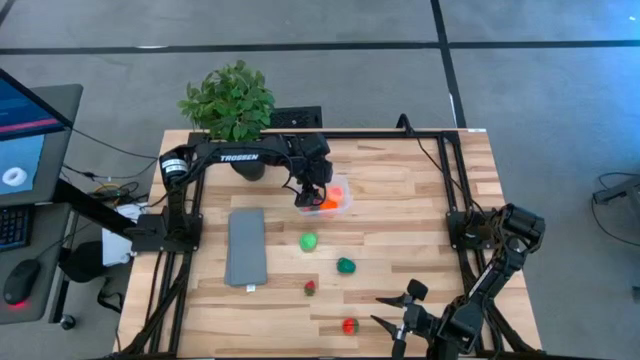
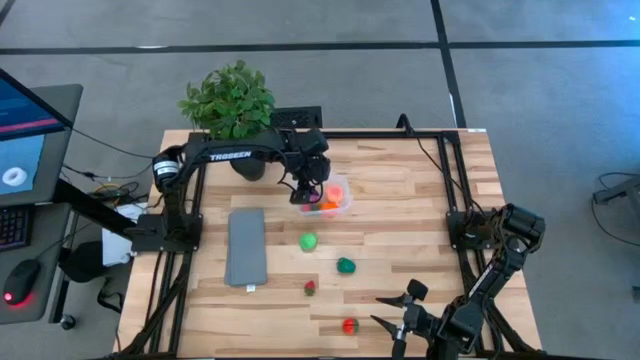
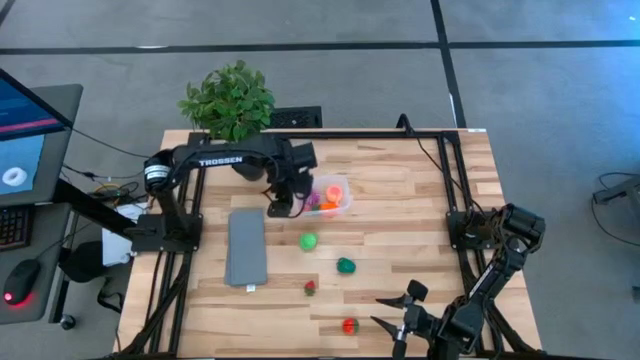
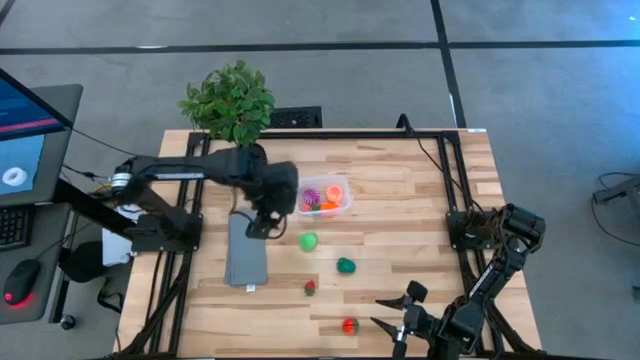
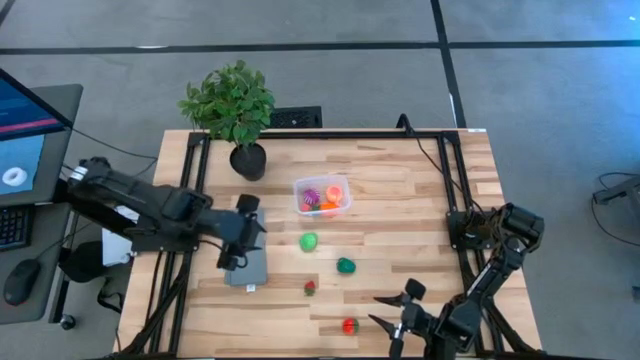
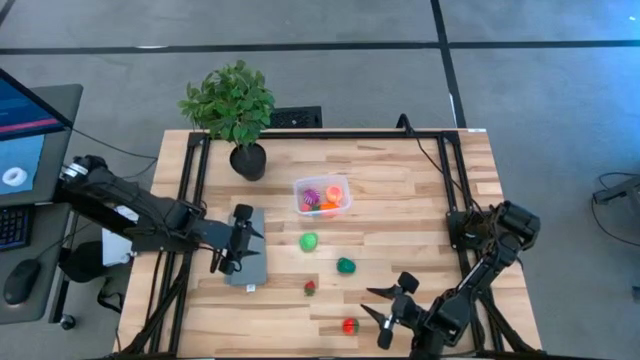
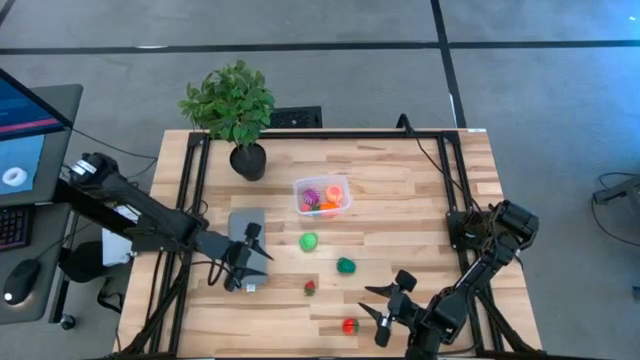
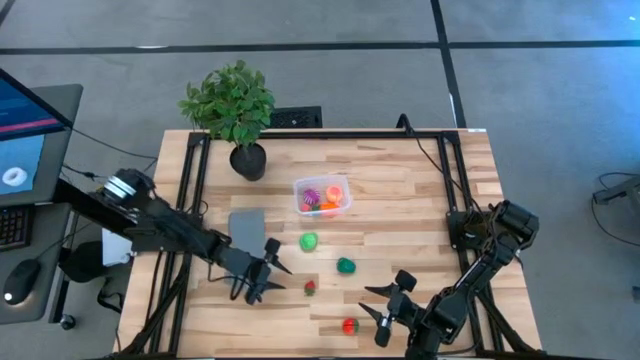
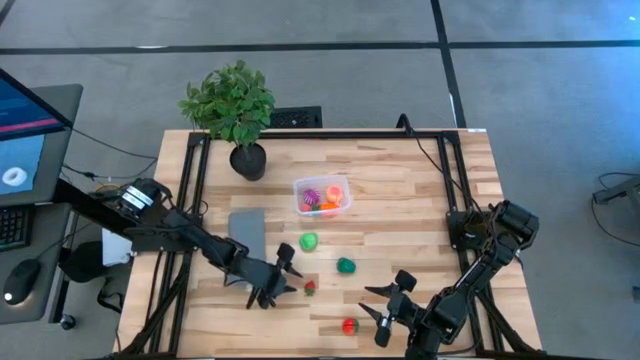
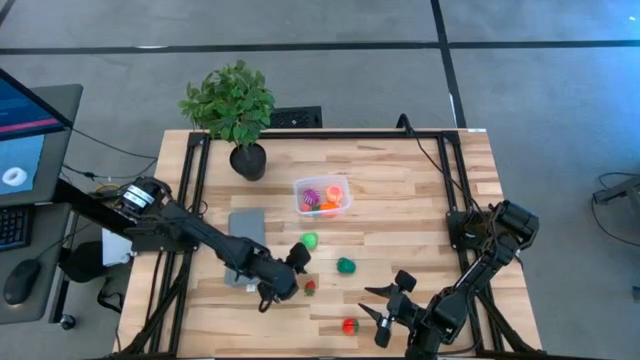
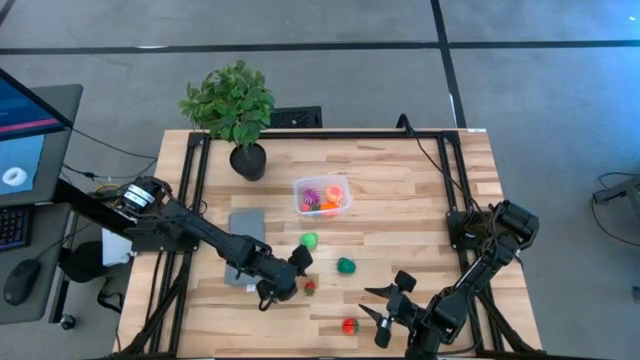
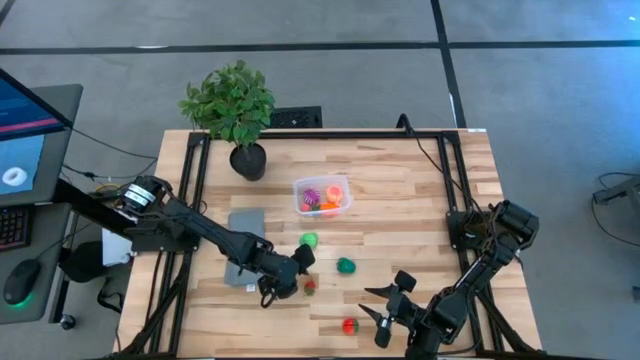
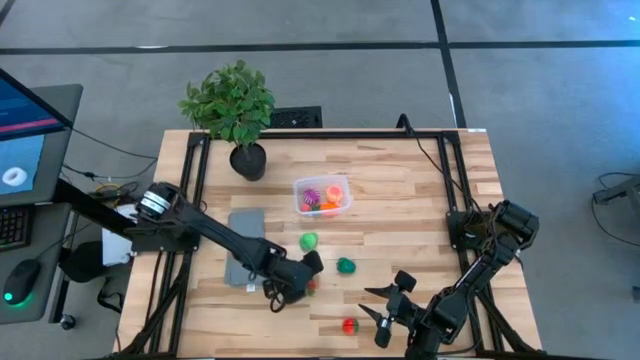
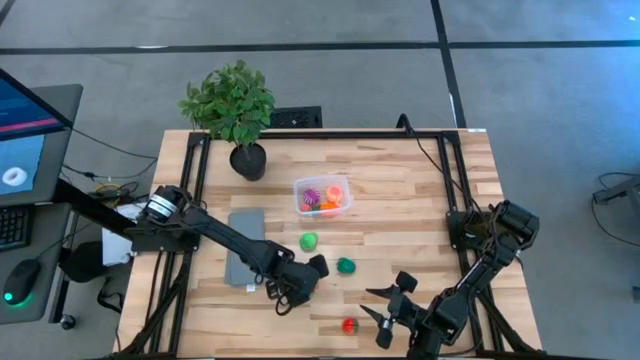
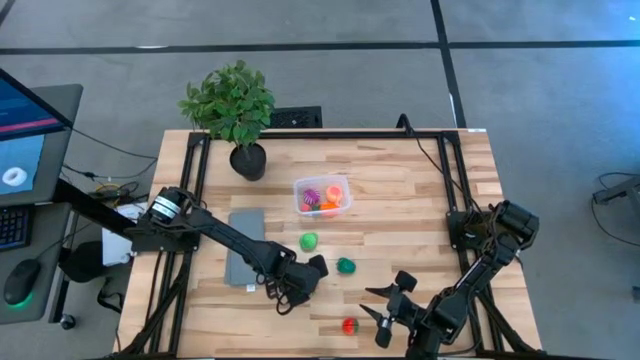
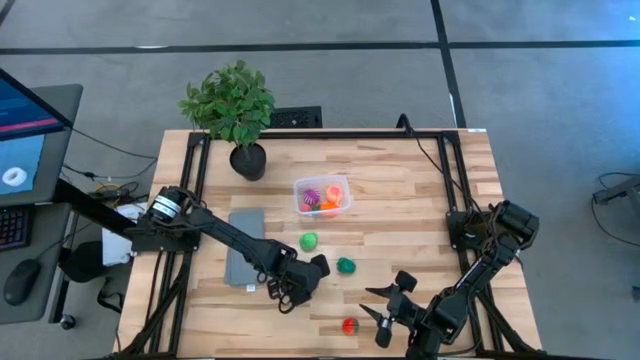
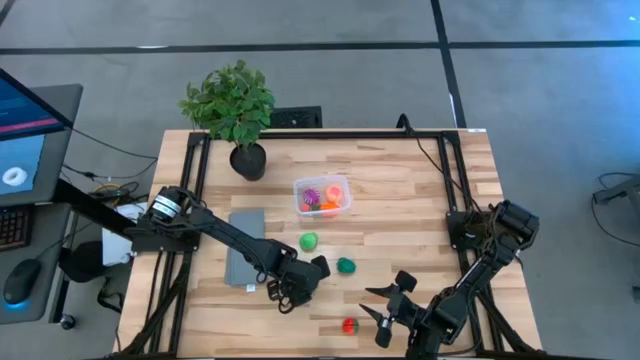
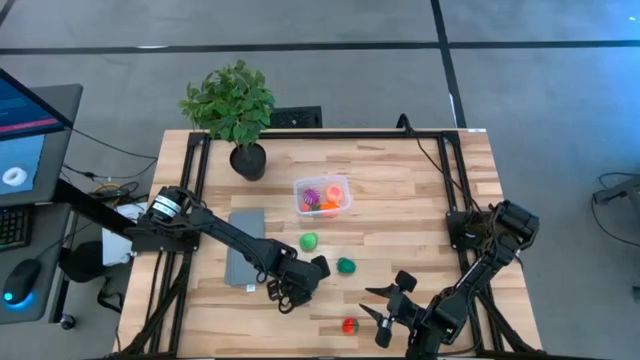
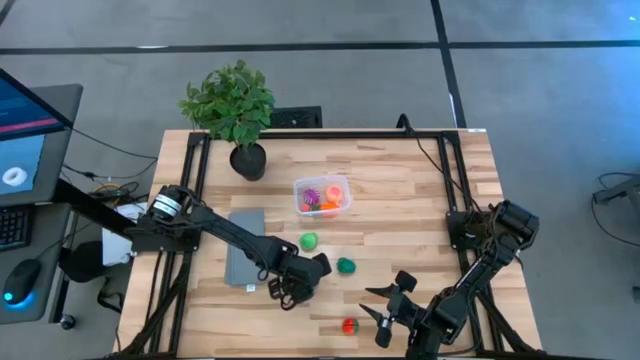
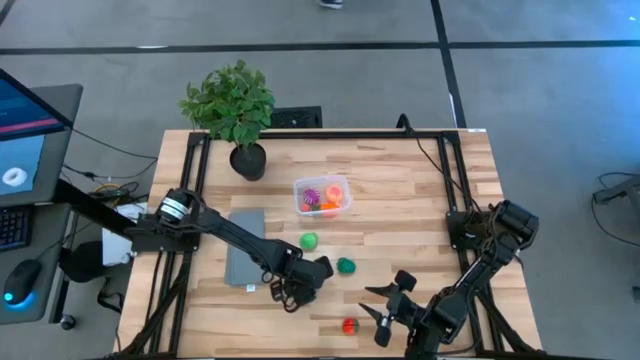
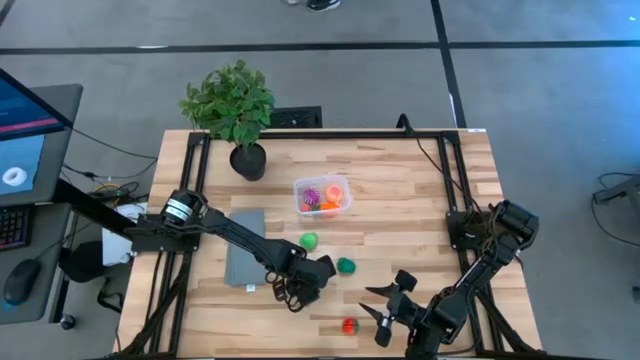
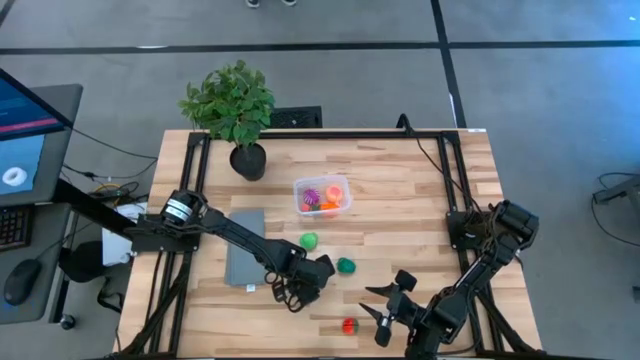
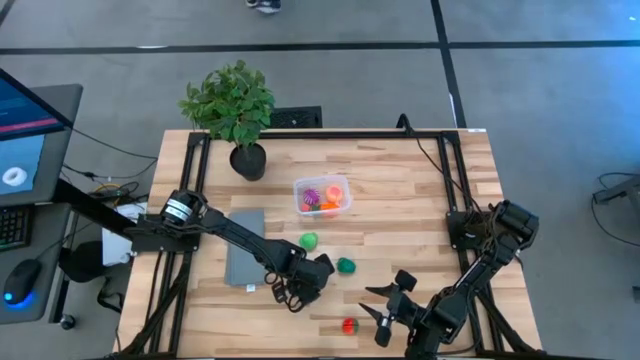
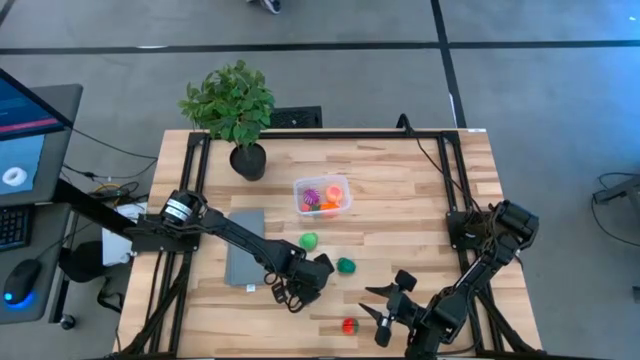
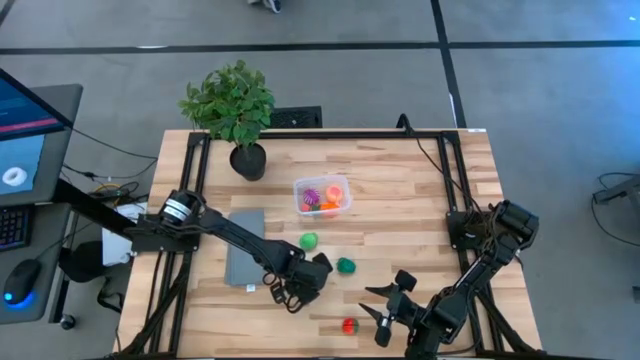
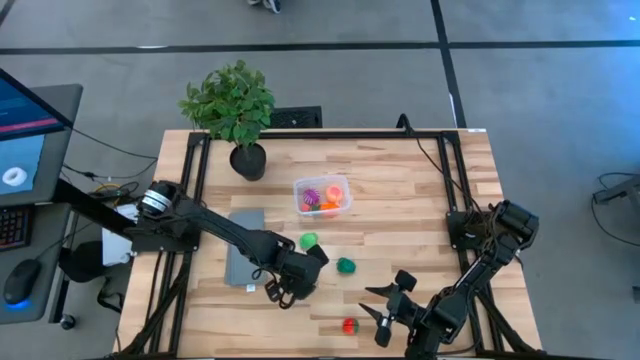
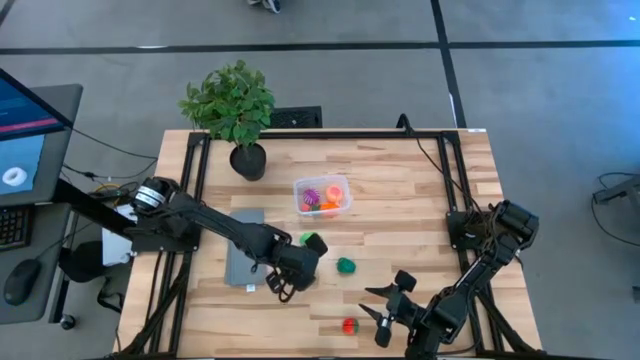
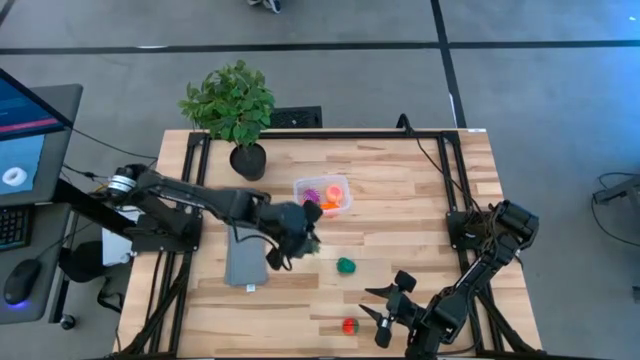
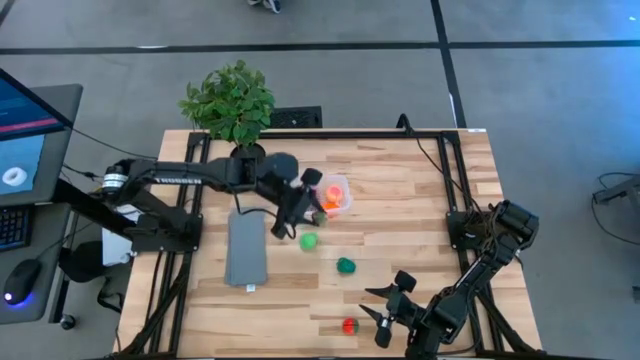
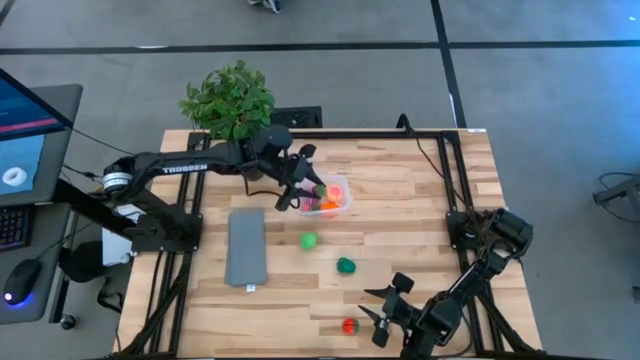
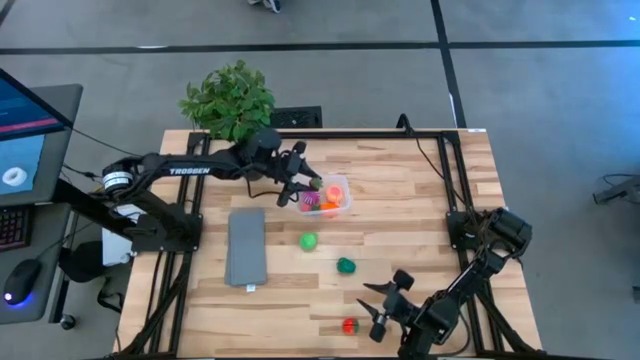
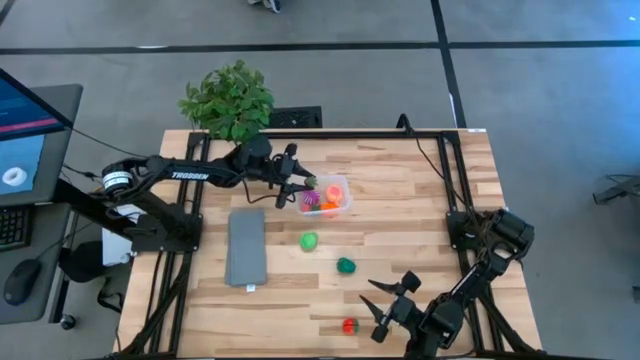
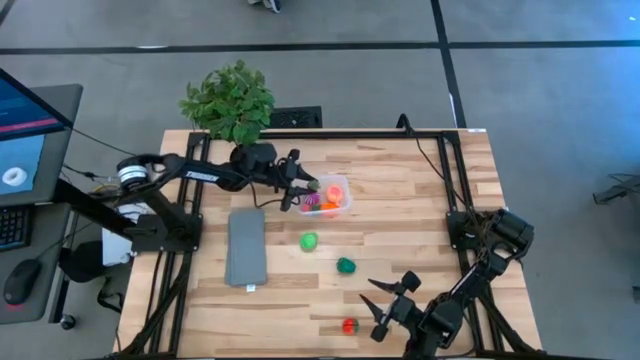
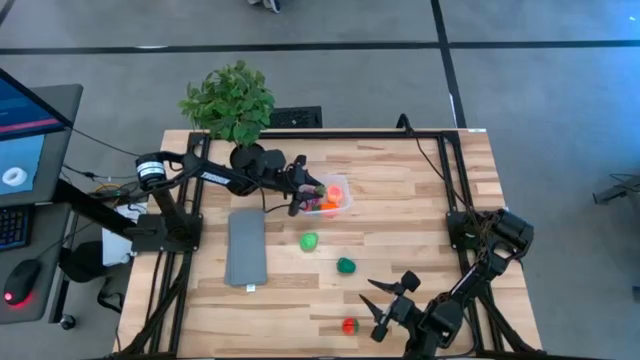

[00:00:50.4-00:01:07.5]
Task: Pick and placing Produce into tupperware
Put the small strawberry into the transparent container

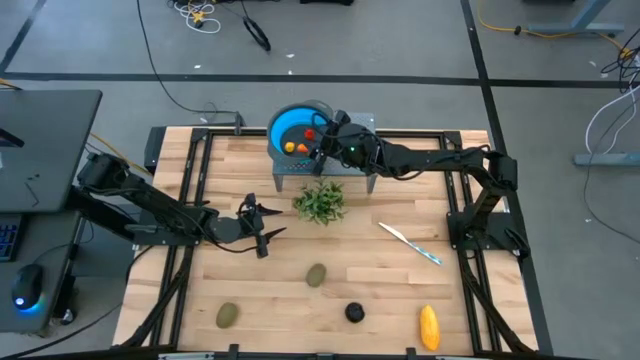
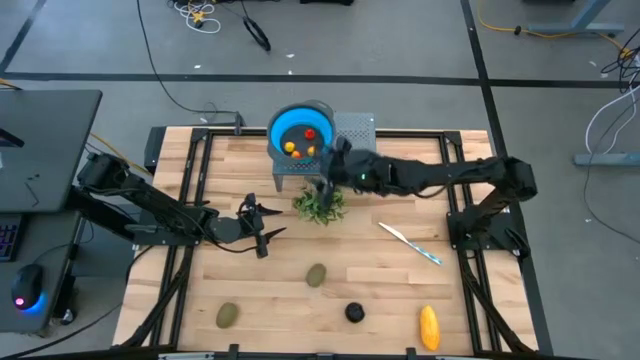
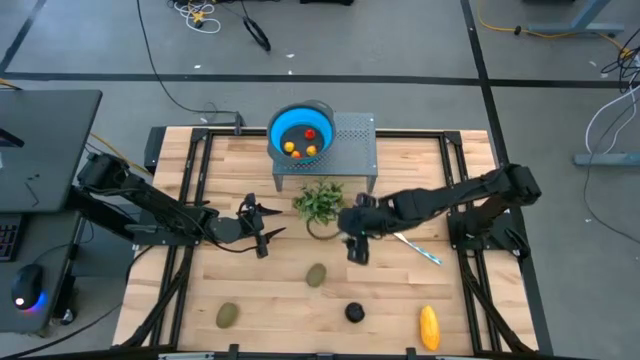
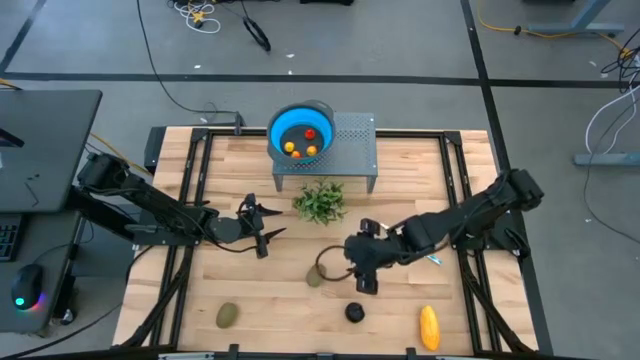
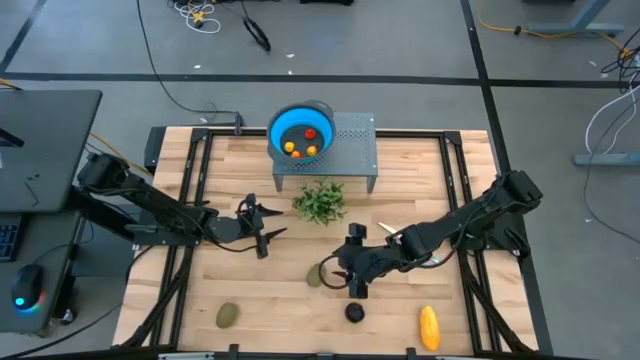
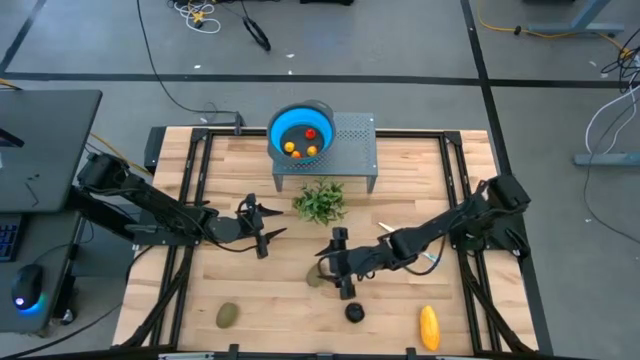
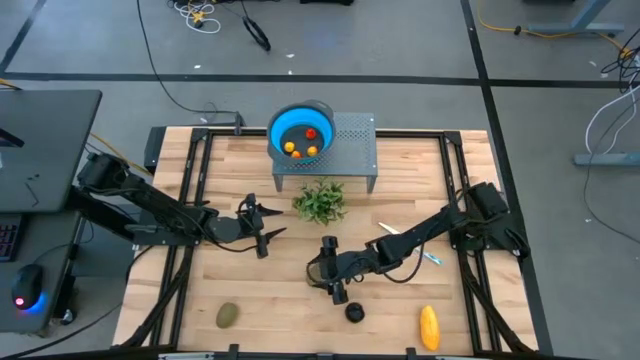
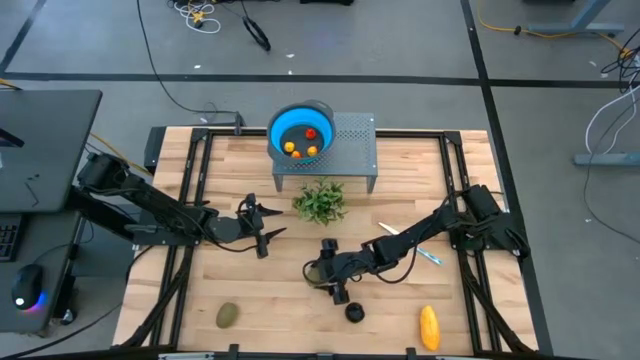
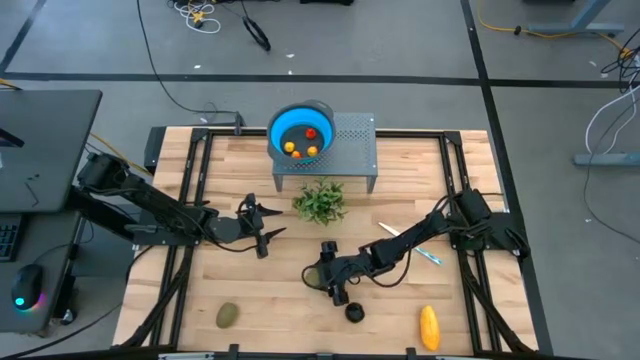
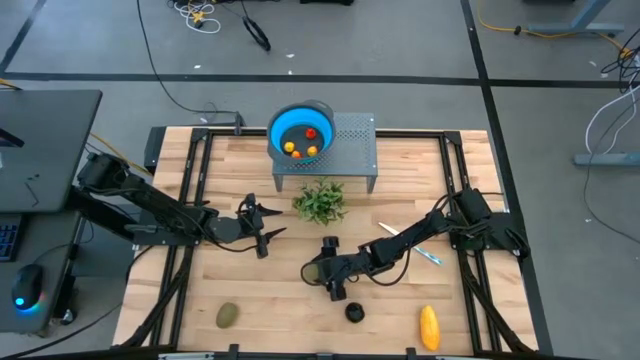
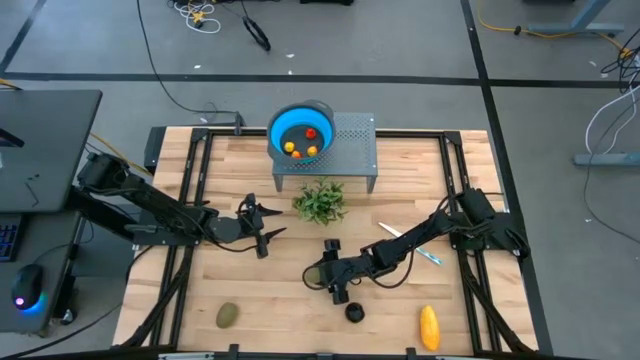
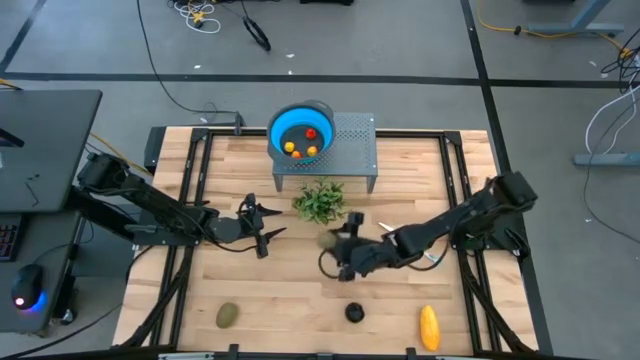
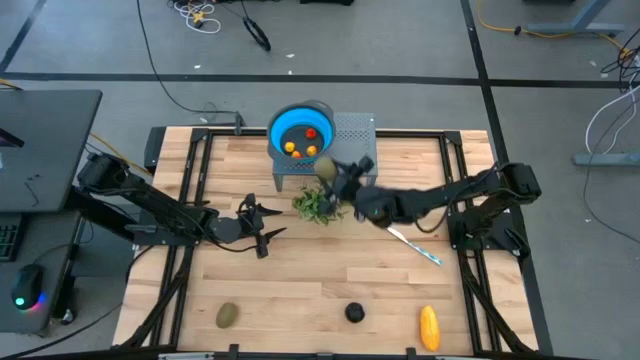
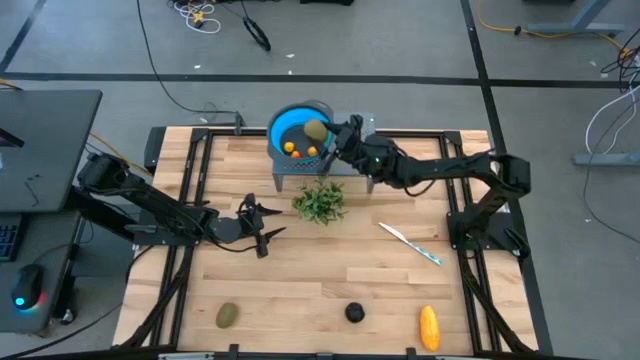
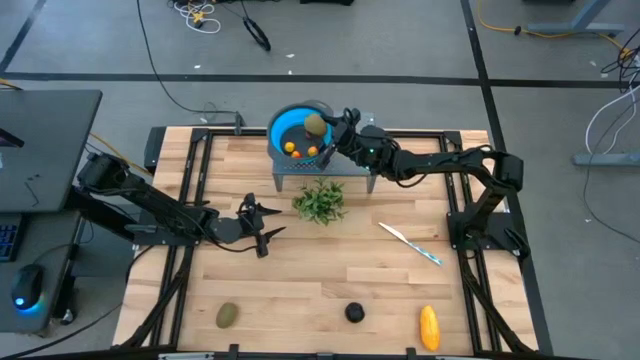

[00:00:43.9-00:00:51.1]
Task: Pick & Place Fruit
Put the brown kiwi into the blue strainer bowl on the shelf
